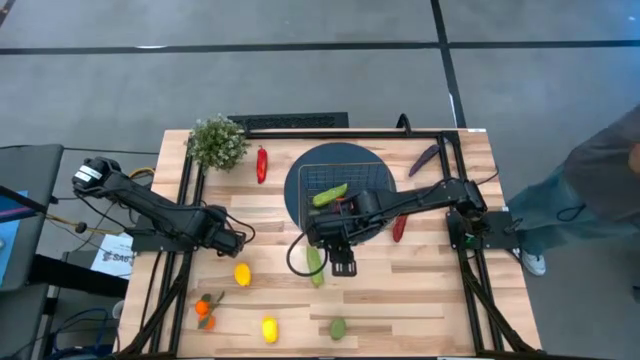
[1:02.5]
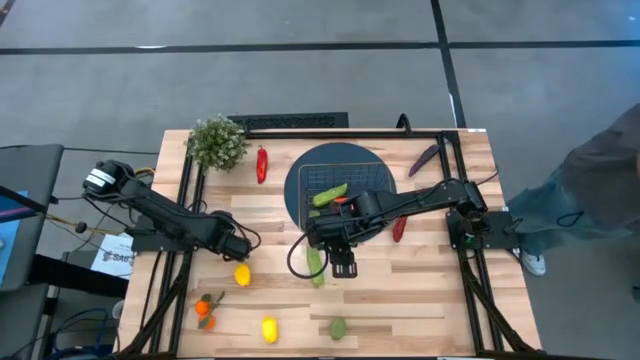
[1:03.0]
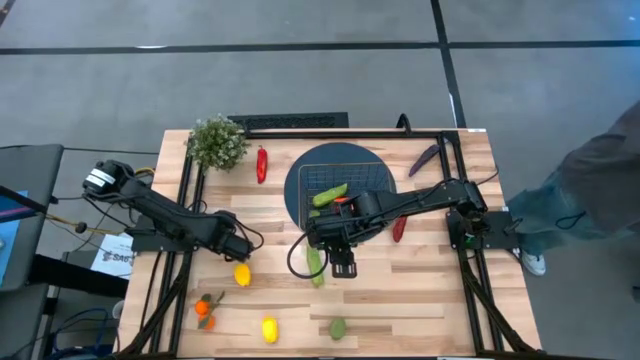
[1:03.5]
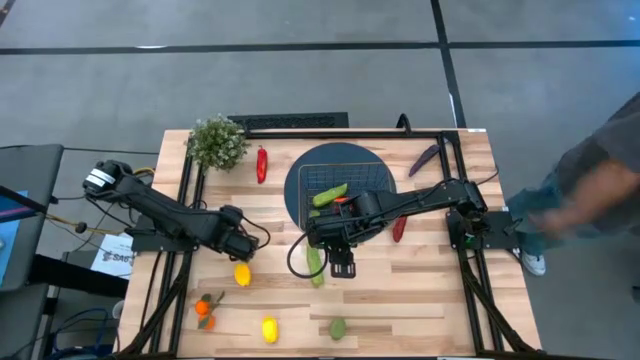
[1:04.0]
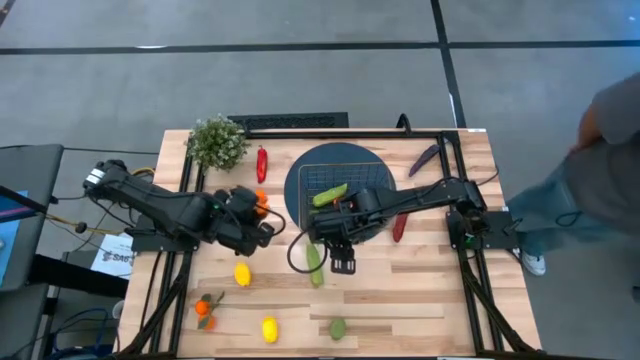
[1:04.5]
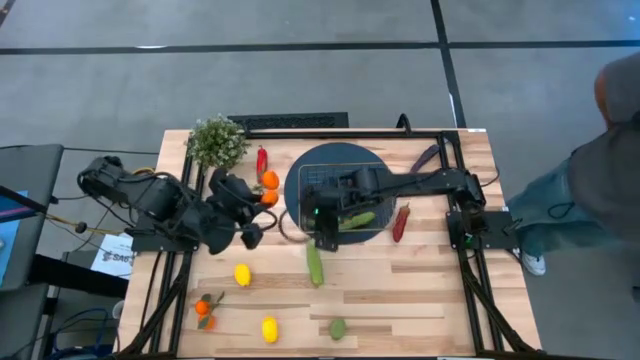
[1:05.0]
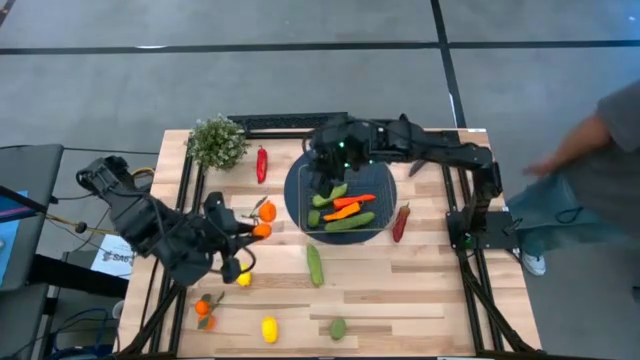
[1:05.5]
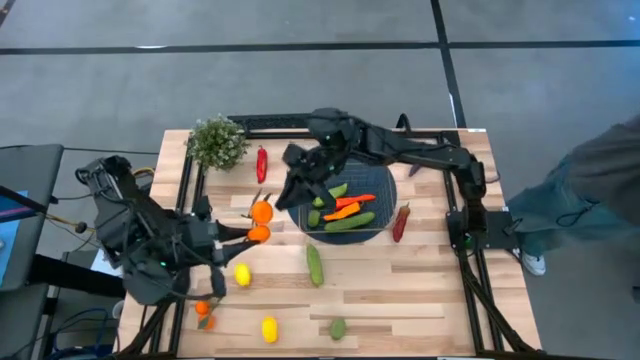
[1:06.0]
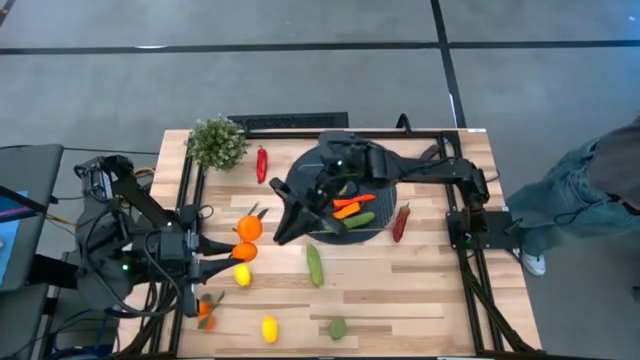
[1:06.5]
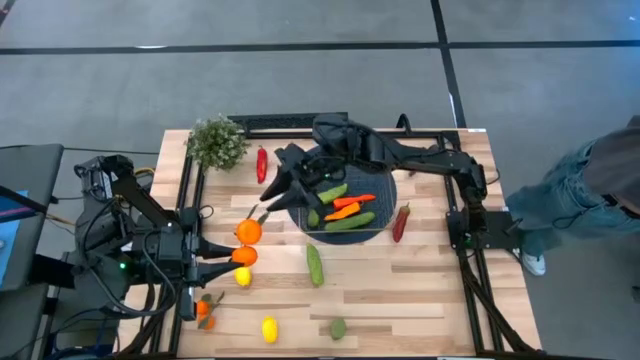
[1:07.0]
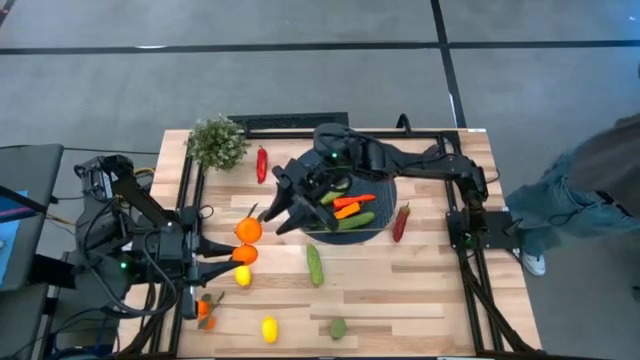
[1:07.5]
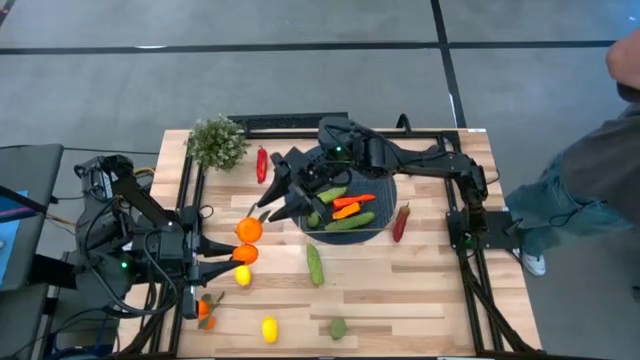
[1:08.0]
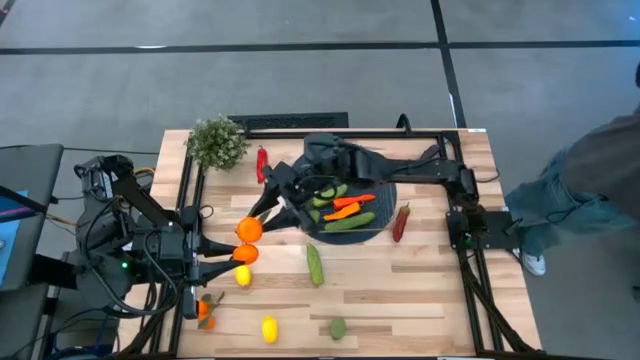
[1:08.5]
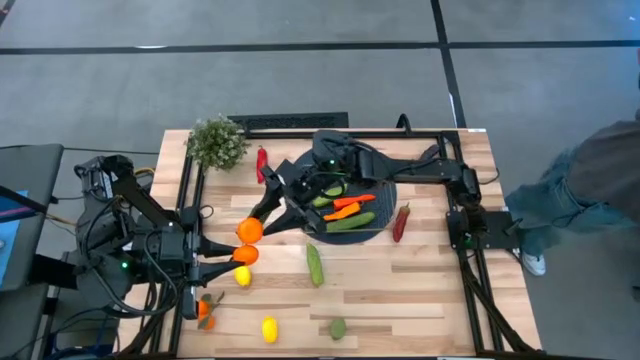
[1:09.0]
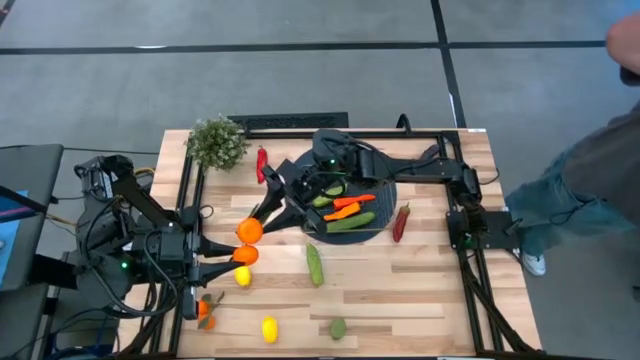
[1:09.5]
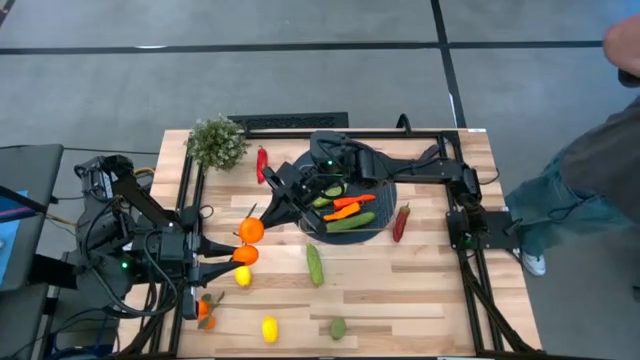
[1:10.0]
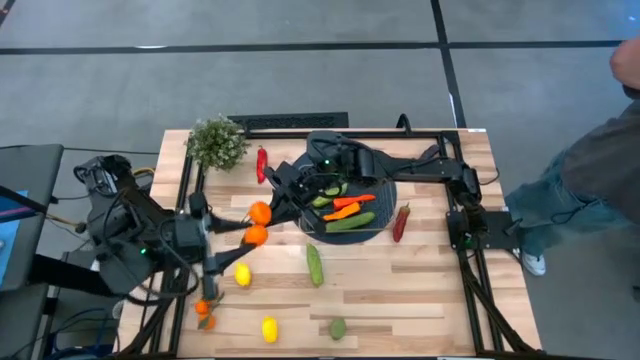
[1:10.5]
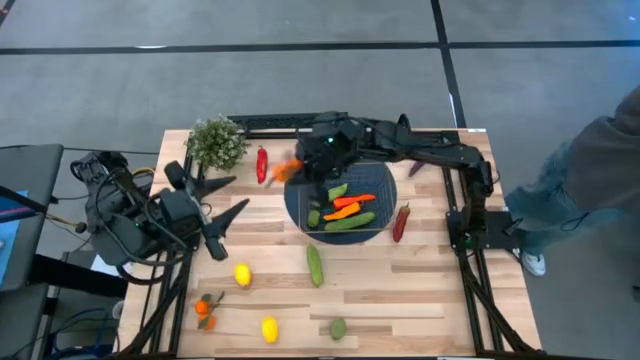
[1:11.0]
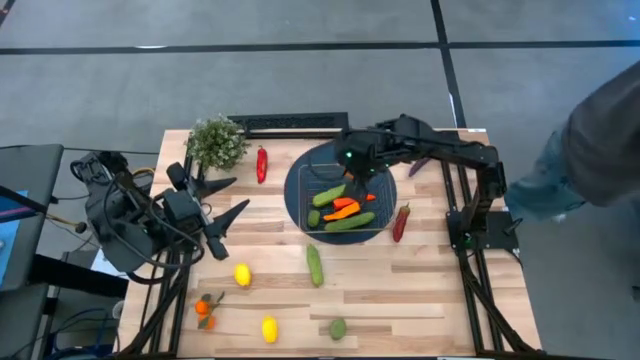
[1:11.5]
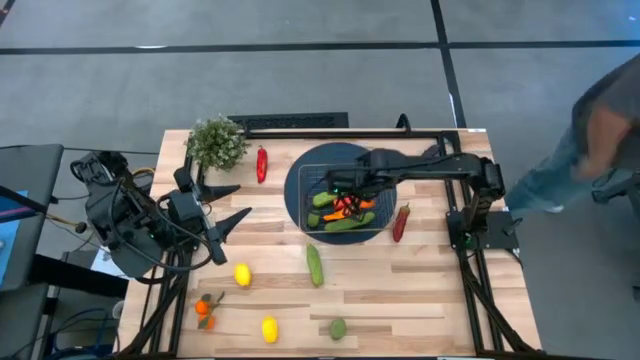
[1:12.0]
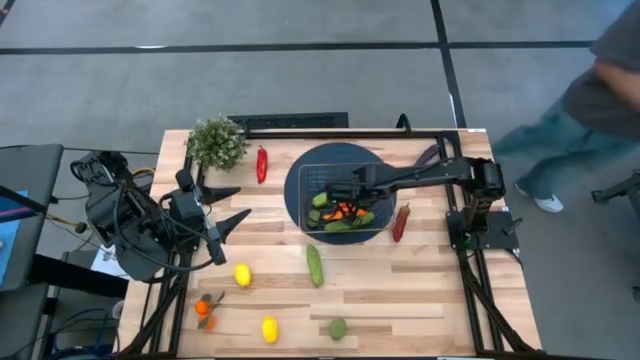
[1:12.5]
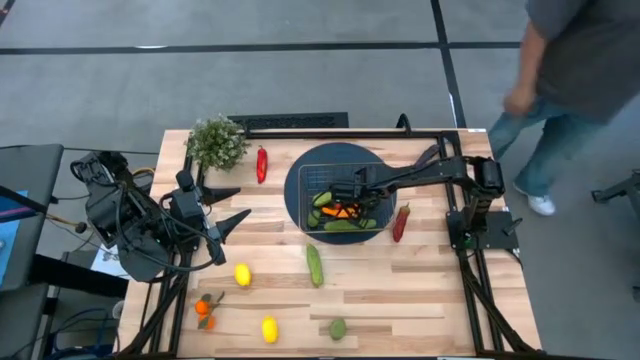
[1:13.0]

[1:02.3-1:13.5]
Task: Build produce basket
Put the top orange tangerine into the wire basket

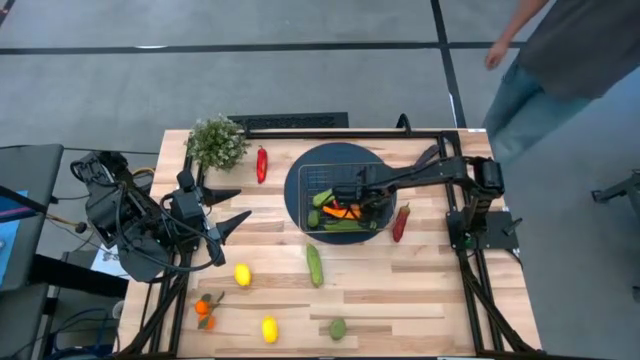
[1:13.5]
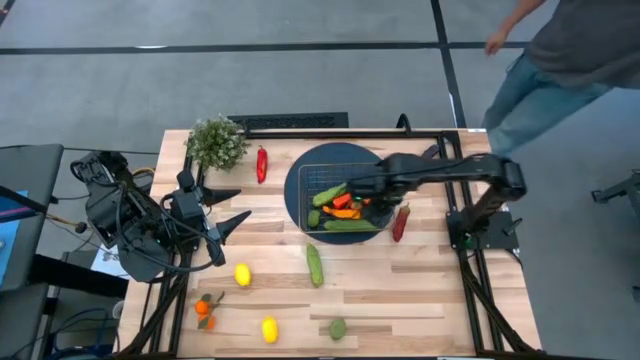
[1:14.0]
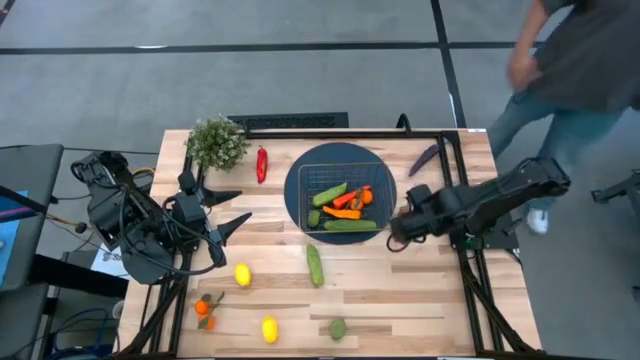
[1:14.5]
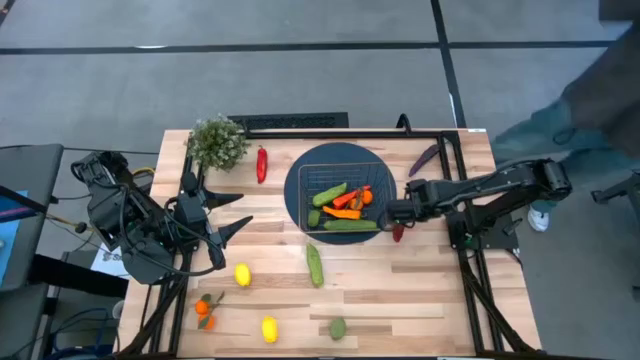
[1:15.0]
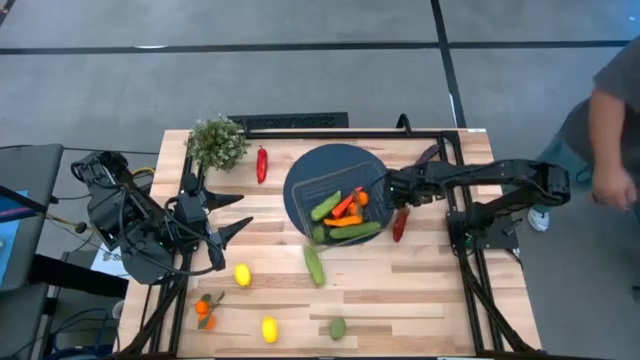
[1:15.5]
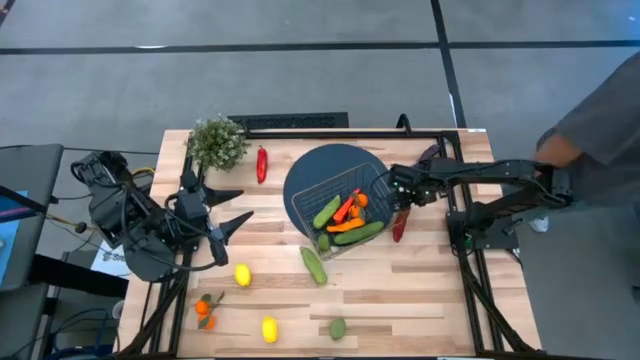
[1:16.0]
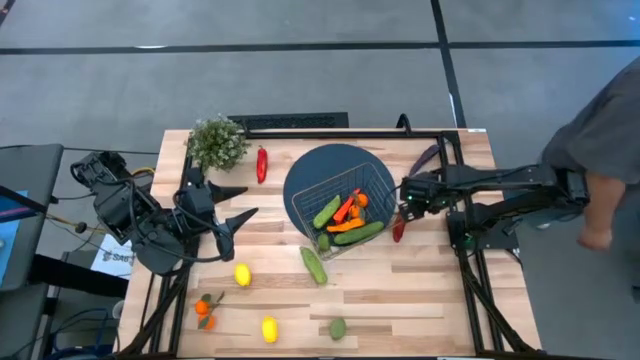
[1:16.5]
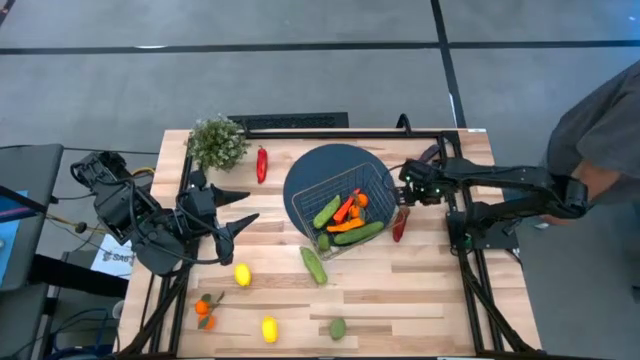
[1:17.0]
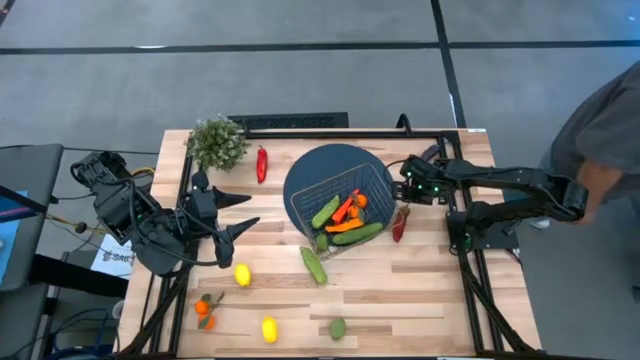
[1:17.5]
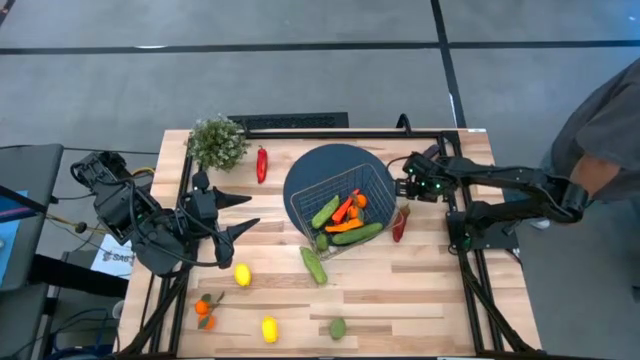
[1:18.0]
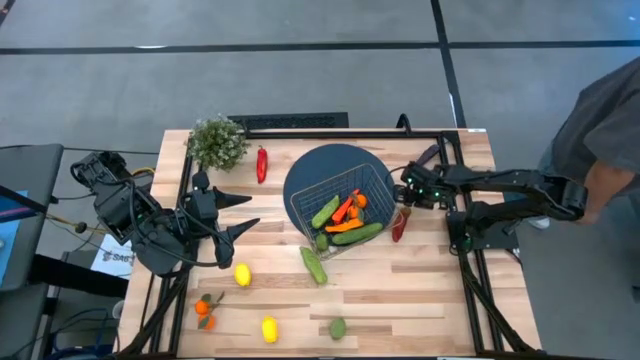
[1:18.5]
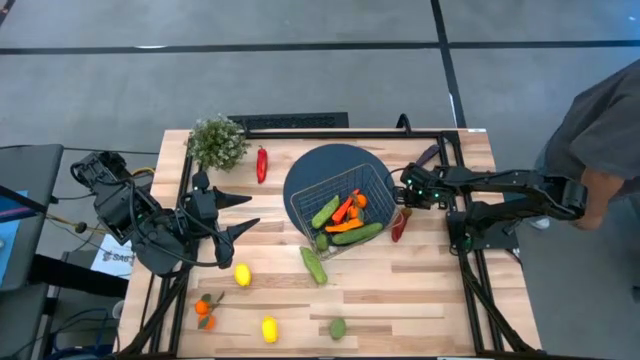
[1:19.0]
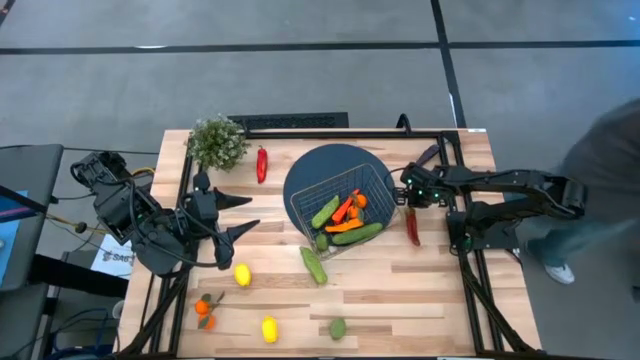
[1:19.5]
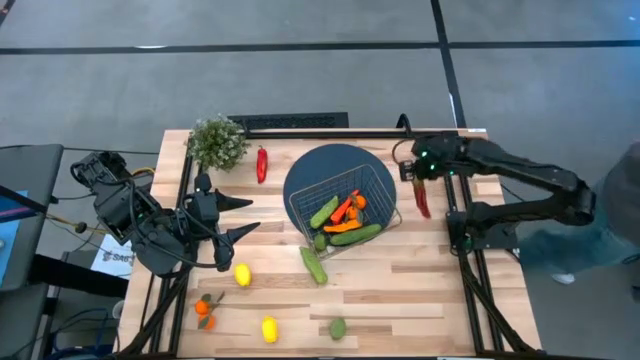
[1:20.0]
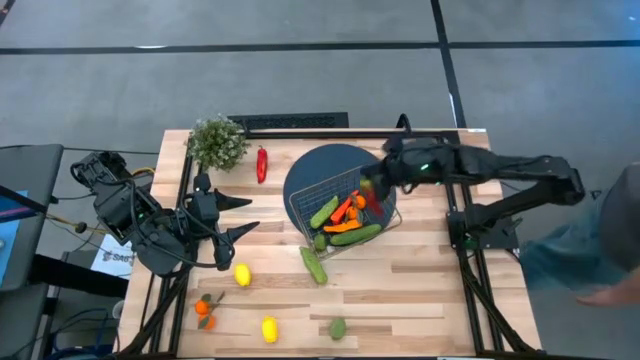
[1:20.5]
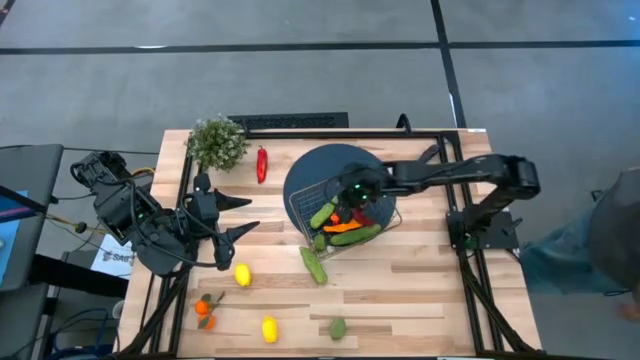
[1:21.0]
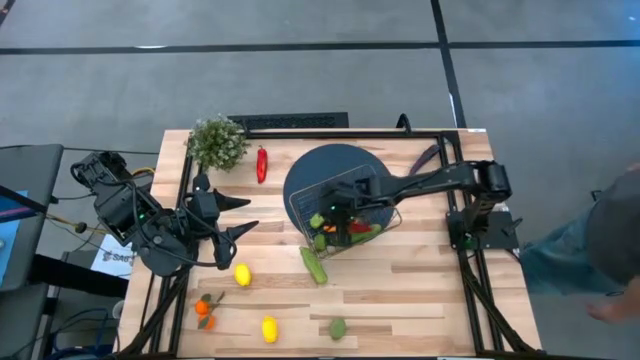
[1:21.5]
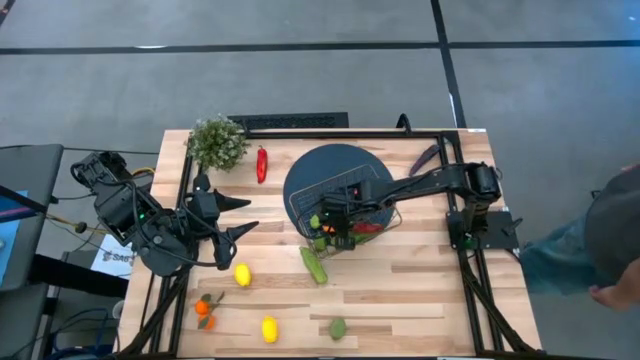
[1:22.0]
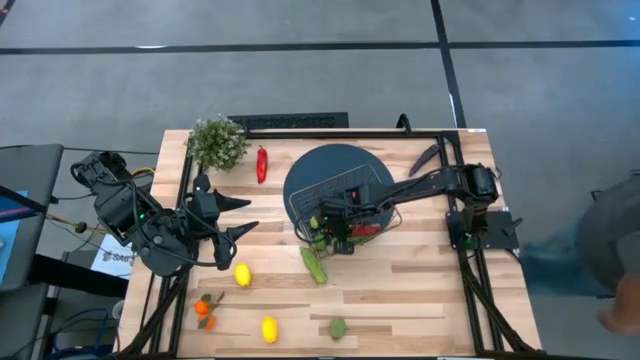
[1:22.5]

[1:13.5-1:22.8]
Put the dark red chili pepper into the wire basket

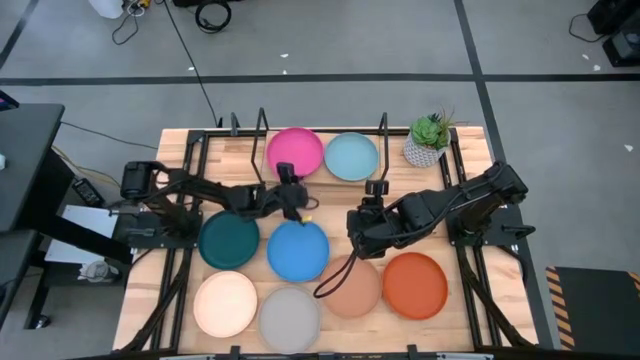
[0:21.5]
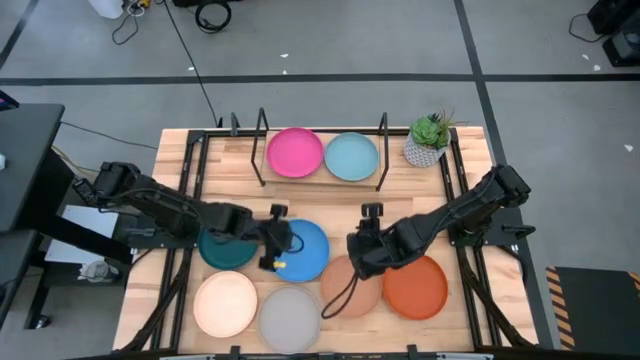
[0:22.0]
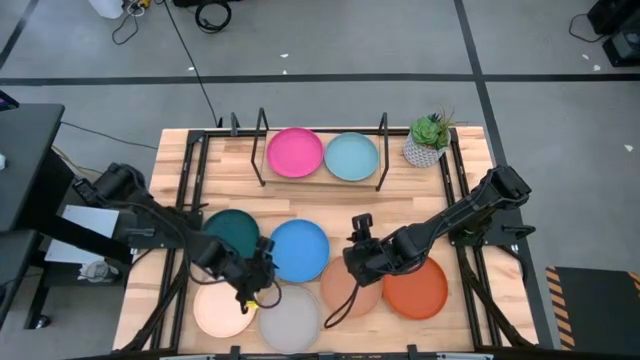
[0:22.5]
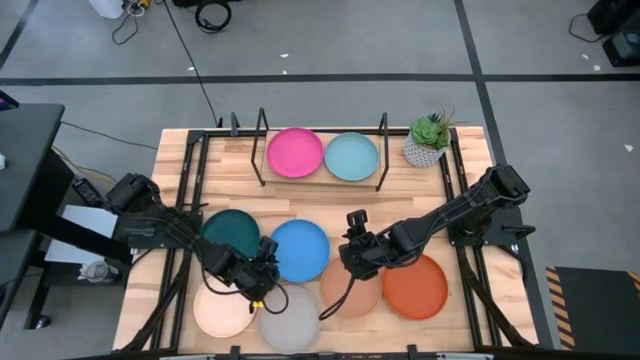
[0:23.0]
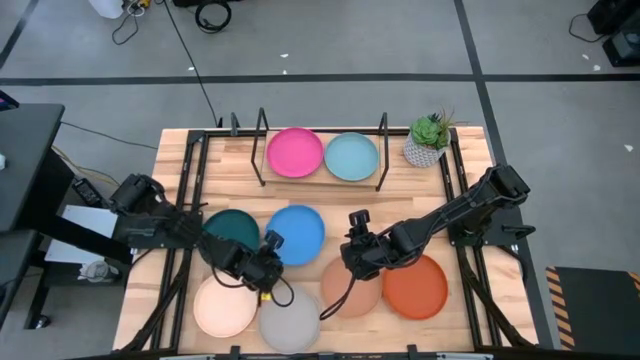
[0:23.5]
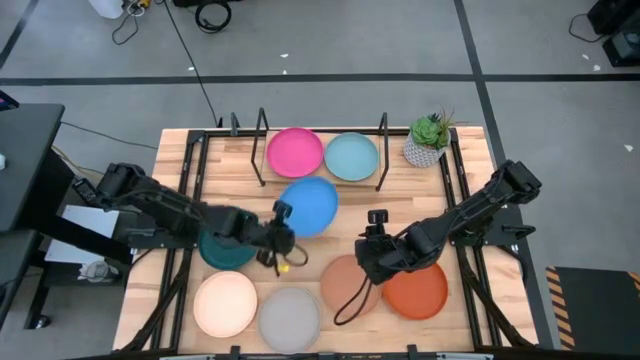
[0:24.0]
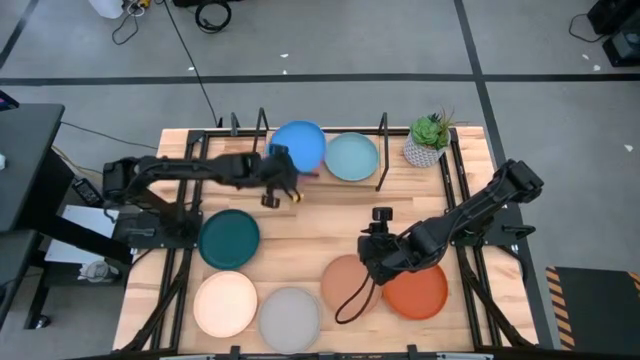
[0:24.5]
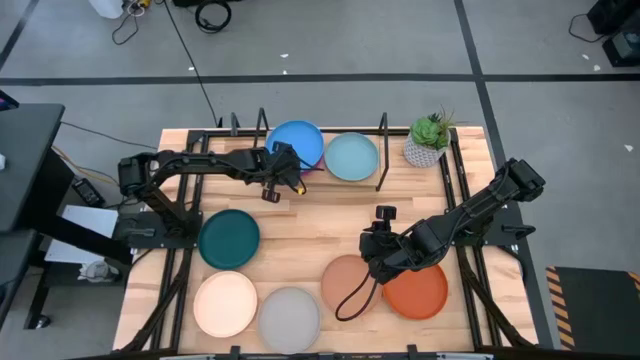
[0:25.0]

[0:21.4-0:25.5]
Task: Place and stack plates onto a shelf
Stack the blue plate on top of the pink plate on the shelf
